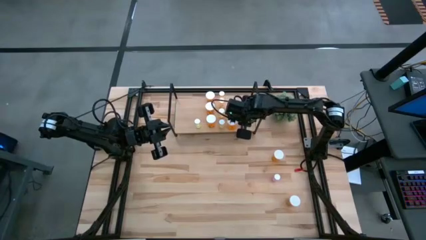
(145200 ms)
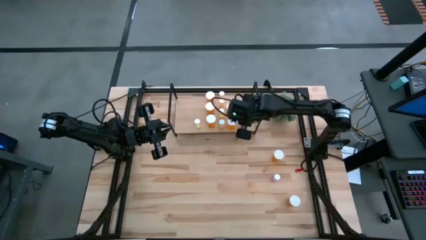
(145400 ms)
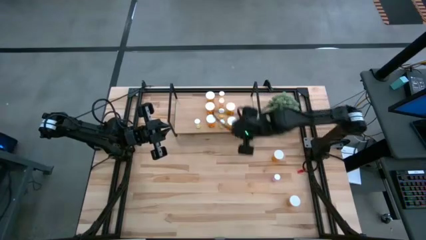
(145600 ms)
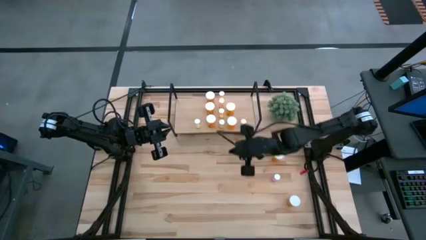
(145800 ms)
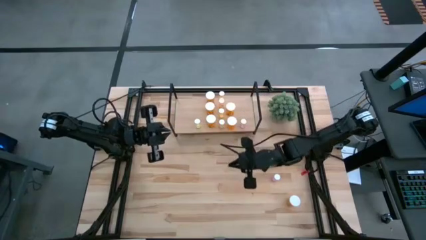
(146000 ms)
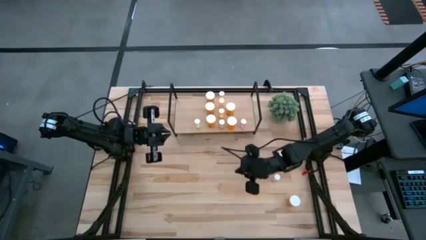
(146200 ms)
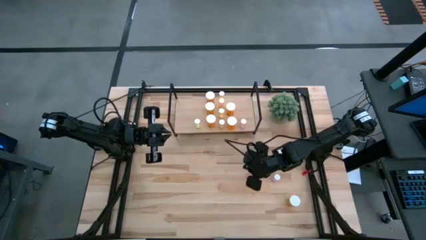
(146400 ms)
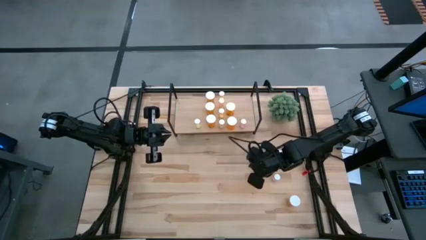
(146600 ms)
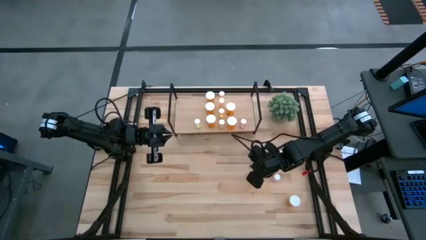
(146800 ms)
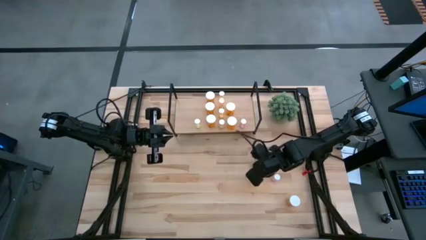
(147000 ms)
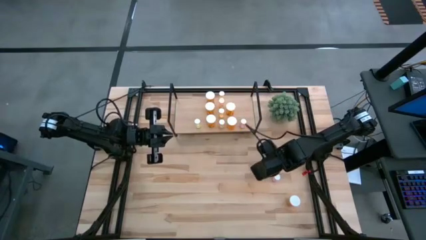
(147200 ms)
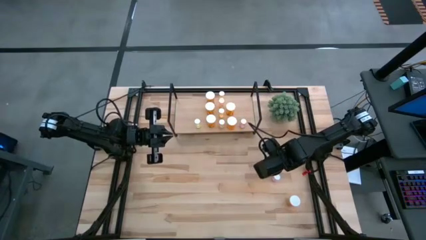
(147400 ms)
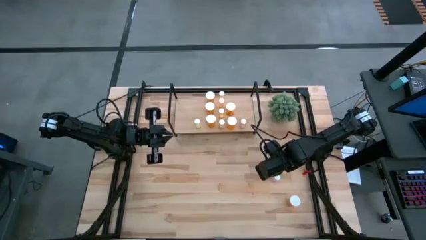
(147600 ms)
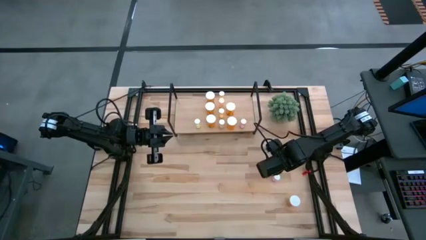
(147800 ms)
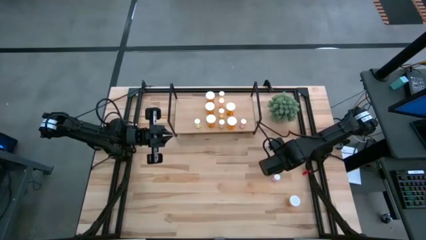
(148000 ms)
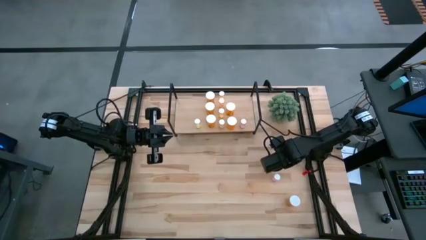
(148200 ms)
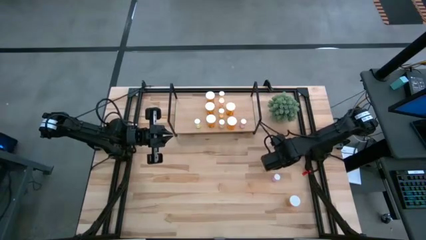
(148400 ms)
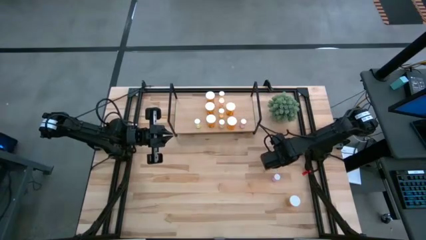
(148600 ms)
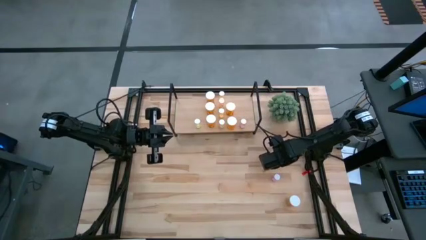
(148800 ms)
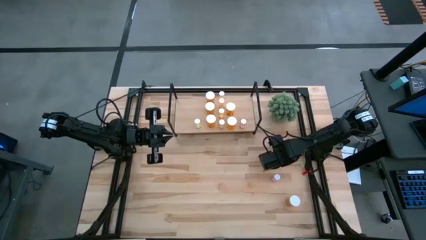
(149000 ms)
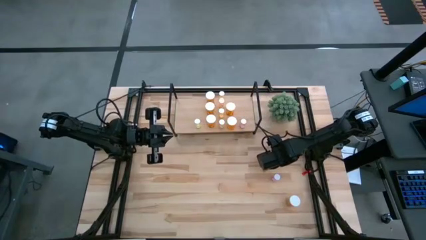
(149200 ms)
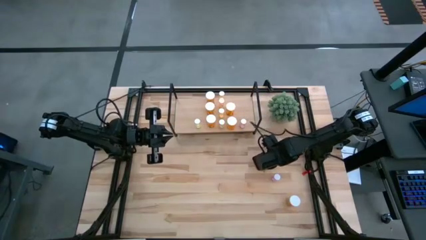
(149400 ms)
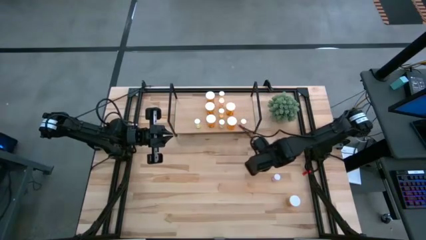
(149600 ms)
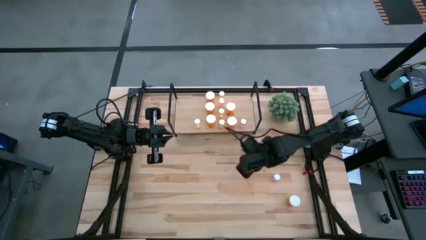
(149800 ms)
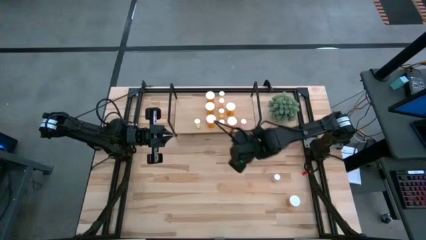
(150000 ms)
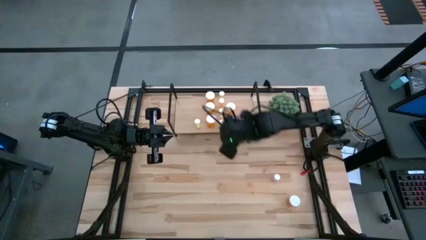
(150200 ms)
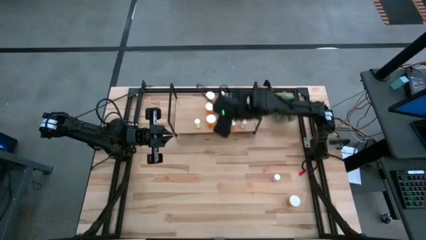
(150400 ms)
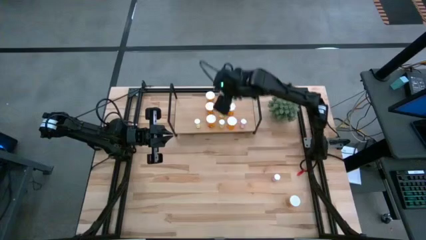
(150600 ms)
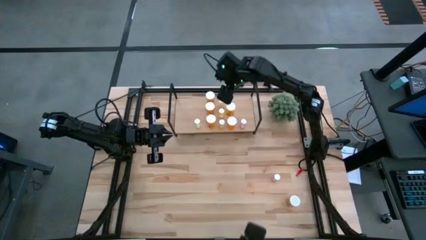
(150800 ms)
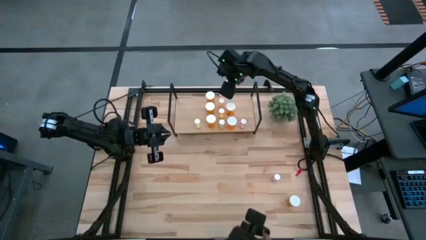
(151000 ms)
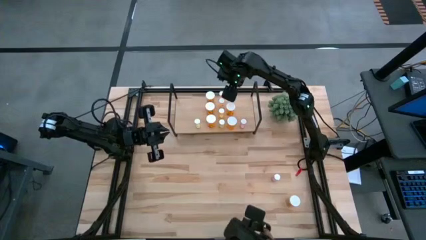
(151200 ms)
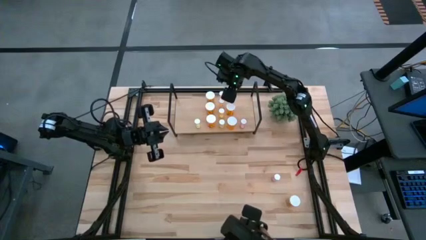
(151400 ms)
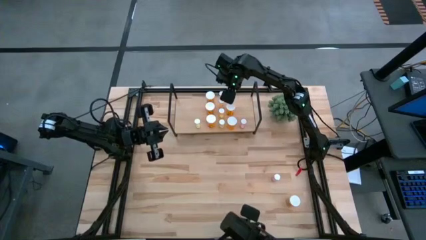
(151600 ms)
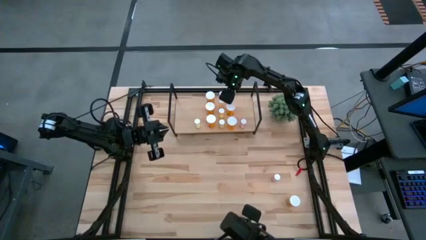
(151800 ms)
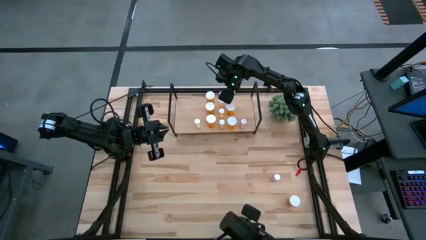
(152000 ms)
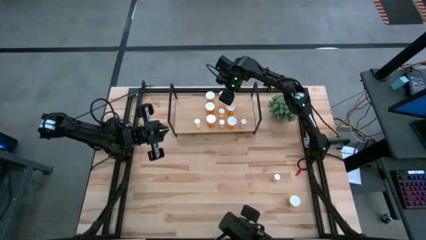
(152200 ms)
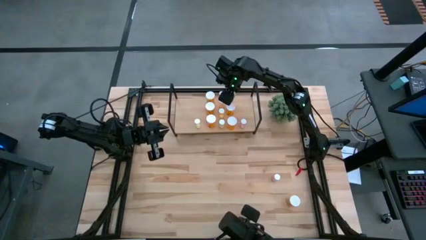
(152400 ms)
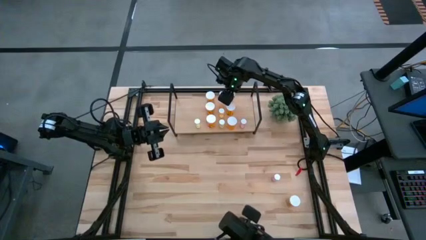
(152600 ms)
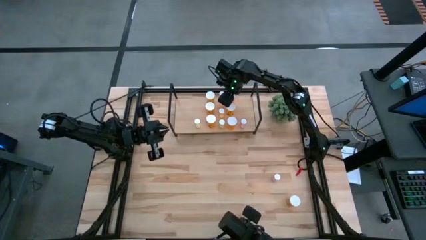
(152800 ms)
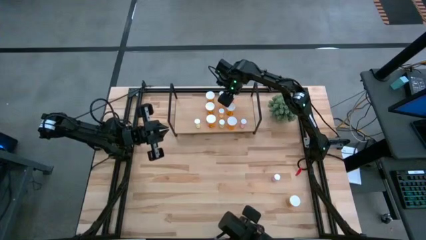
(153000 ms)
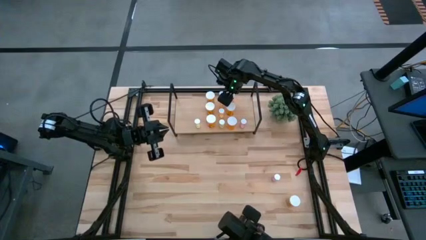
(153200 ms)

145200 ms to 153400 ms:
Task: Pick and place medicine bottles onto shelf by color
Put the large orange pill bottle on the shelf aligned with the other large orange pill bottle

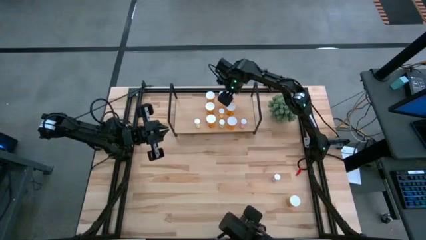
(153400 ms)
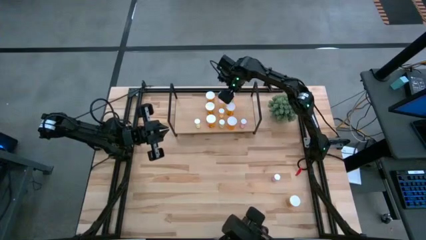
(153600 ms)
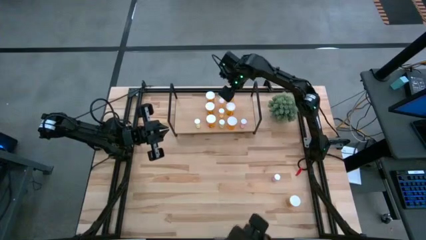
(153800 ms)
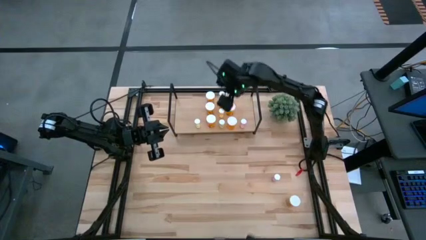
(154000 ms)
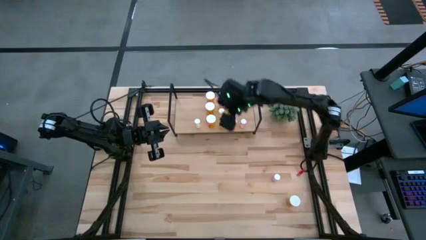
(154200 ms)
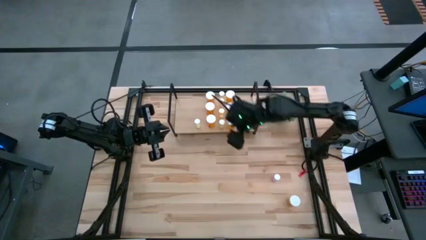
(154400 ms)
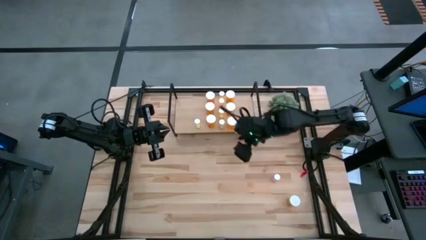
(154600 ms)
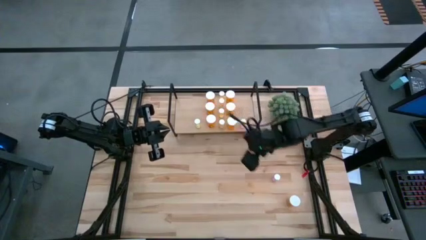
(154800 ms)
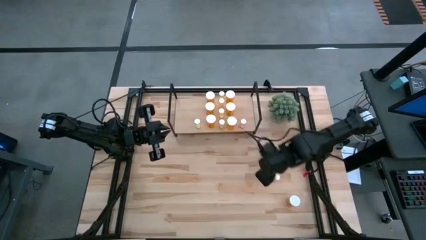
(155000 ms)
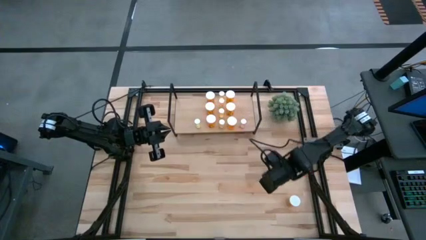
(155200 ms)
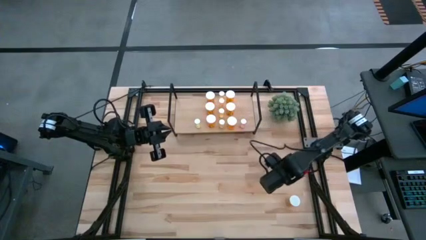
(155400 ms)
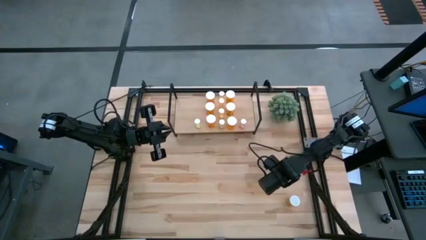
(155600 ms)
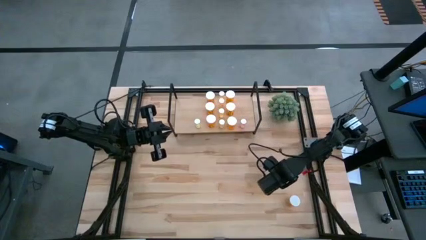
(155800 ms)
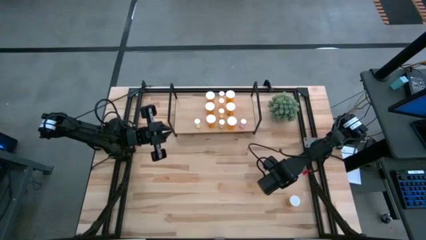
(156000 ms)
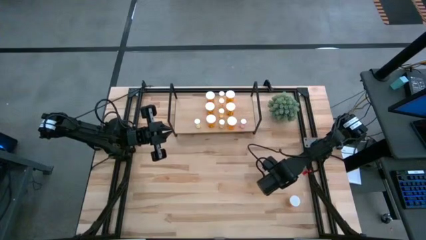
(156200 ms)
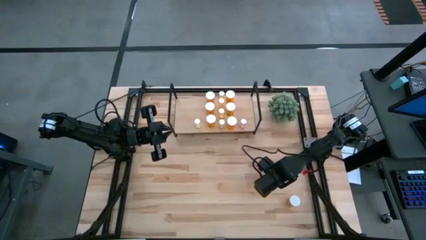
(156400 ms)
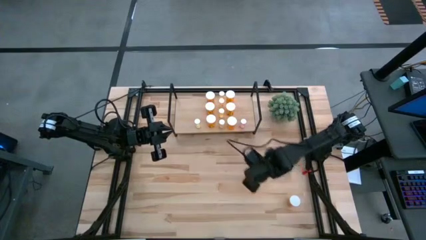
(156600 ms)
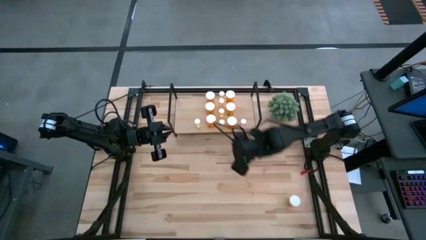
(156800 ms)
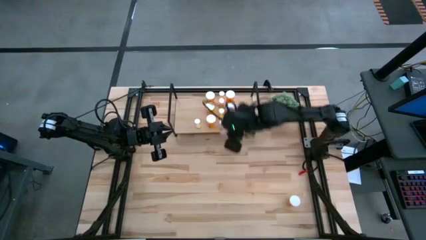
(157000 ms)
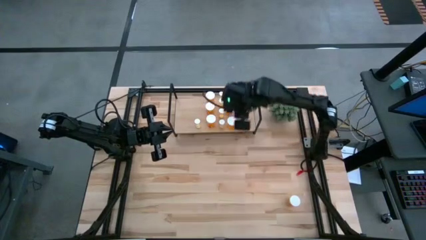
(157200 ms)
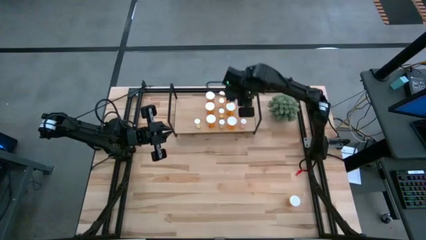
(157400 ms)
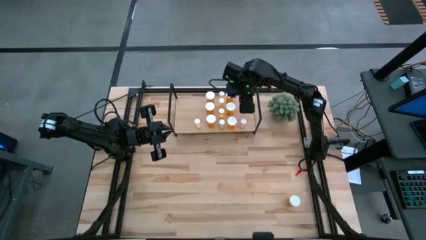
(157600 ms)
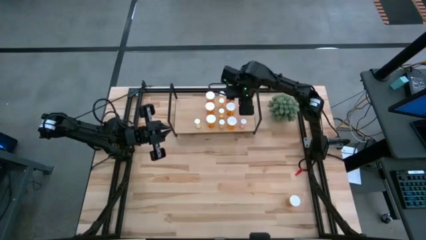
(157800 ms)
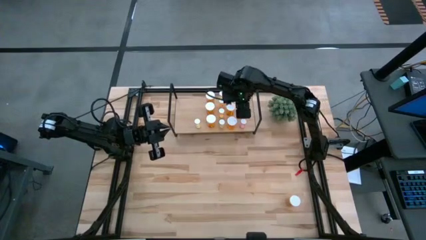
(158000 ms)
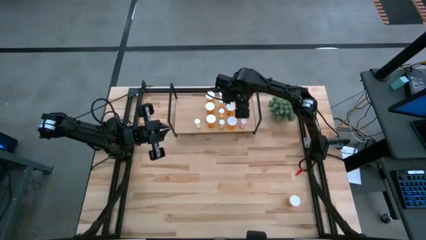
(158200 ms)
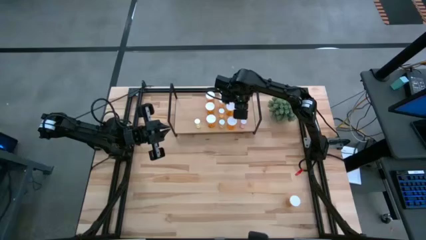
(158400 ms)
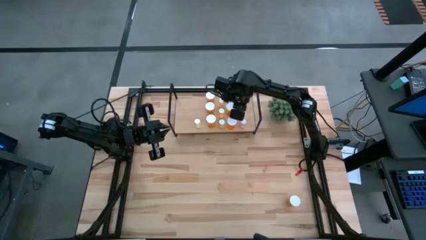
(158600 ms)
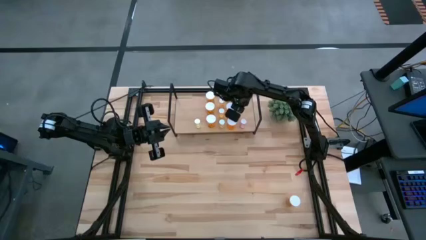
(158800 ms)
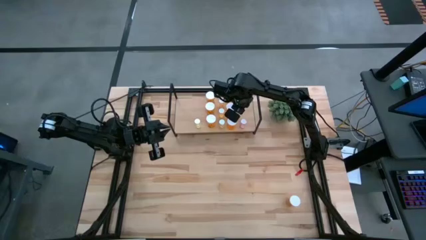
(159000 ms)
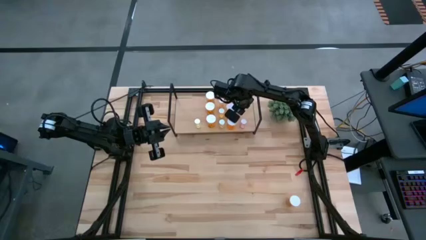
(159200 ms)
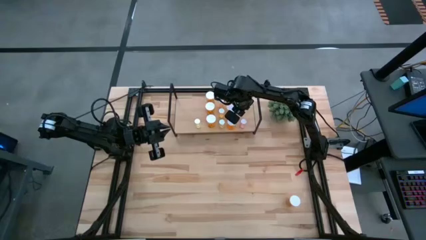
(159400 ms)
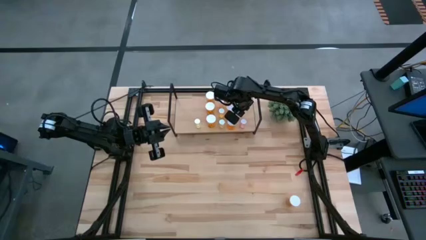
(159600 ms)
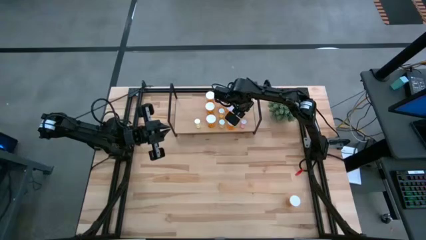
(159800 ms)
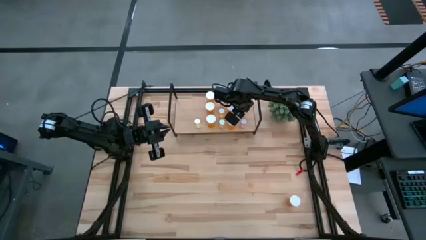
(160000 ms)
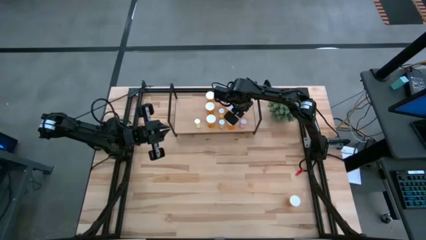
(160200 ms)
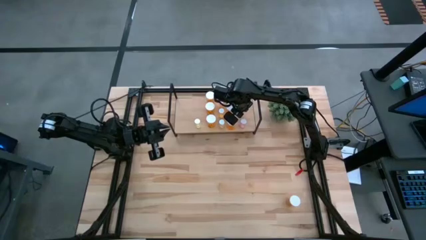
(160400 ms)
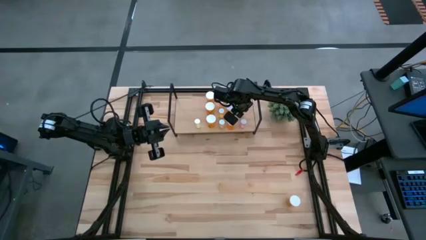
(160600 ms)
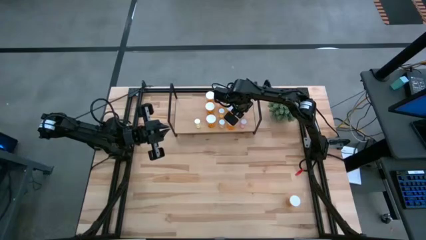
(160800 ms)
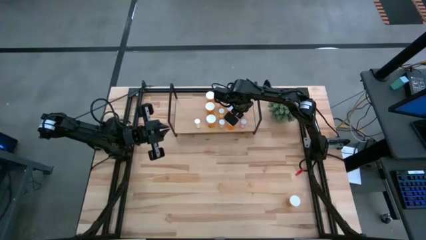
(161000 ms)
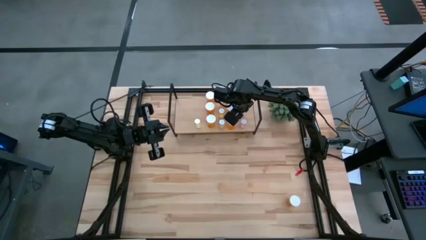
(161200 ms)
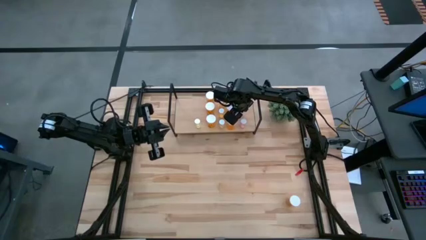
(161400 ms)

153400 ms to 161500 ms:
Put the small pink pill bottle on the shelf aligned with the other small pink pill bottle
